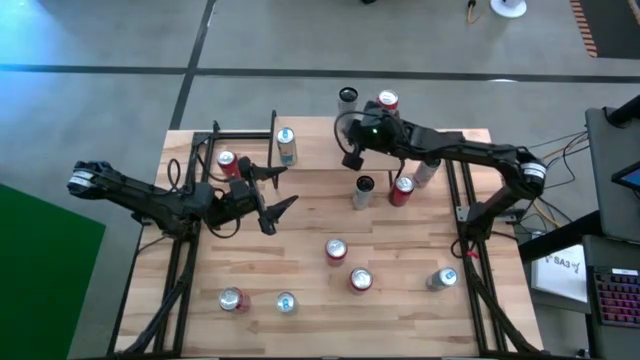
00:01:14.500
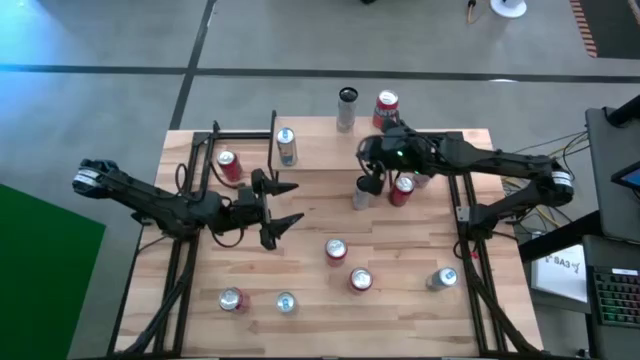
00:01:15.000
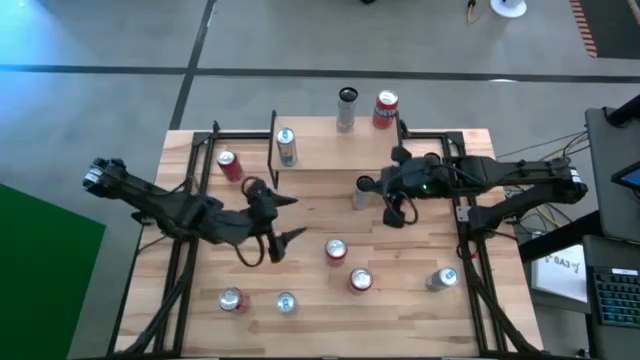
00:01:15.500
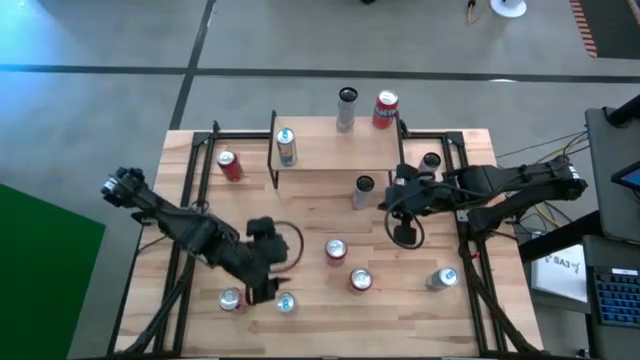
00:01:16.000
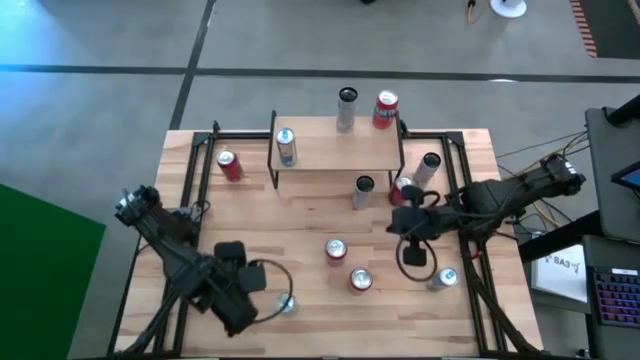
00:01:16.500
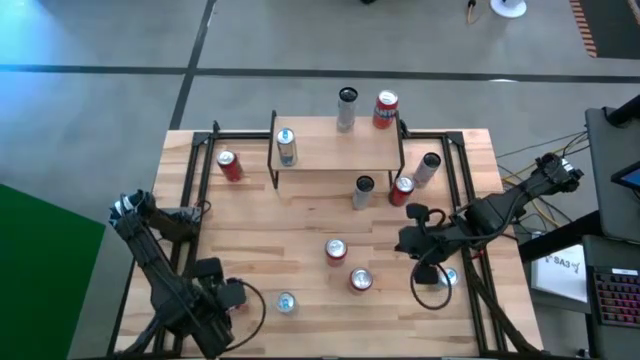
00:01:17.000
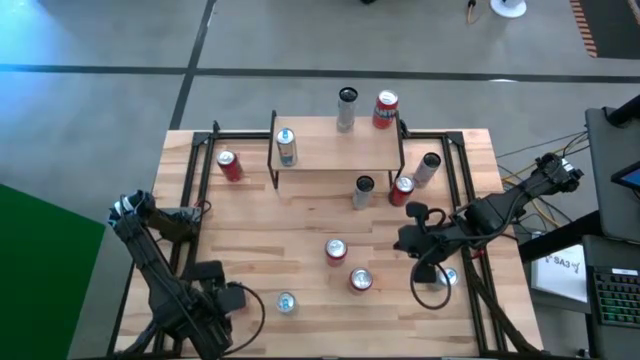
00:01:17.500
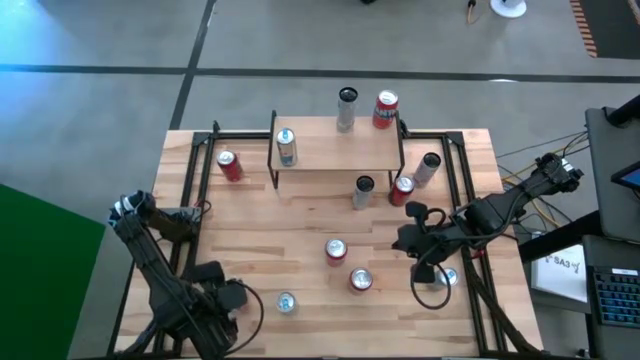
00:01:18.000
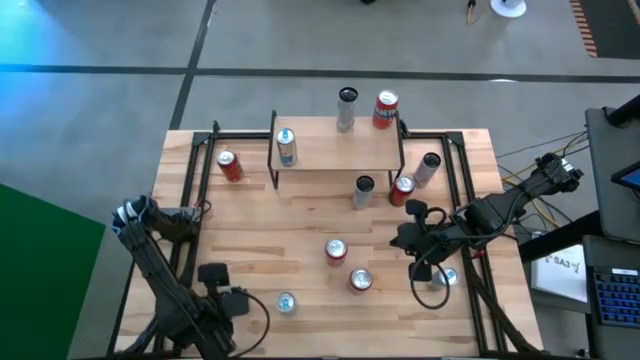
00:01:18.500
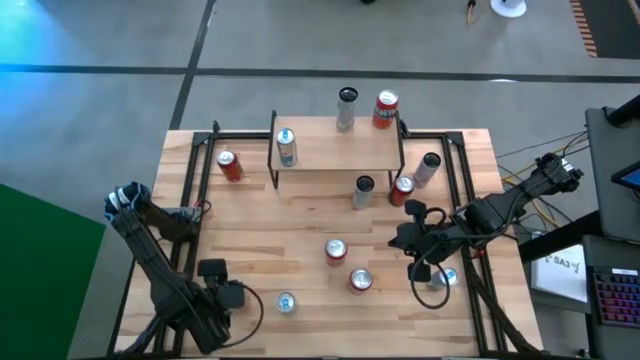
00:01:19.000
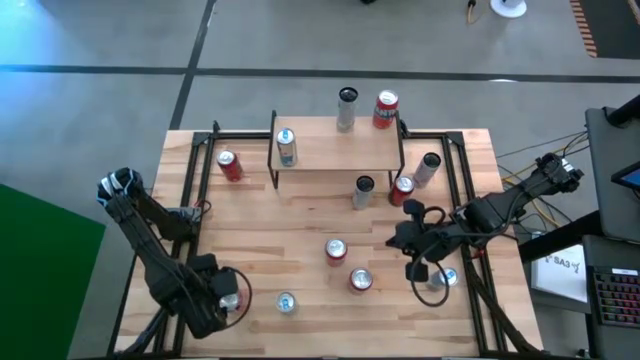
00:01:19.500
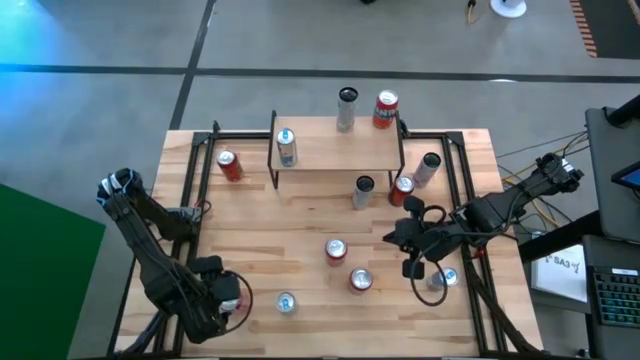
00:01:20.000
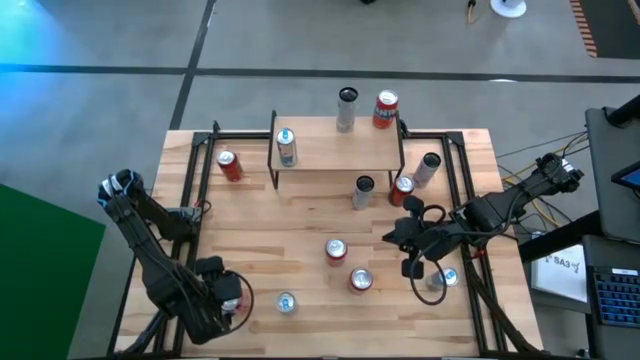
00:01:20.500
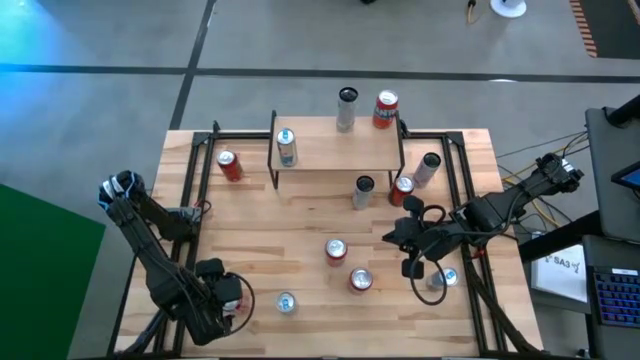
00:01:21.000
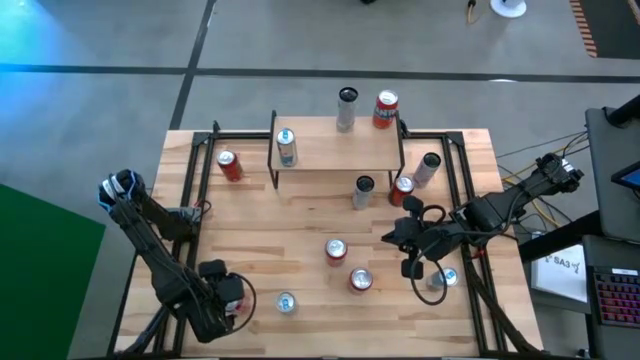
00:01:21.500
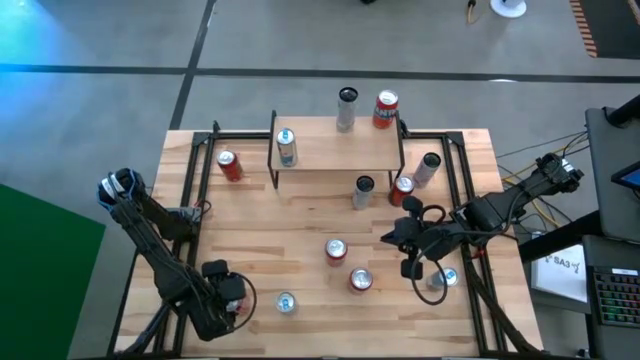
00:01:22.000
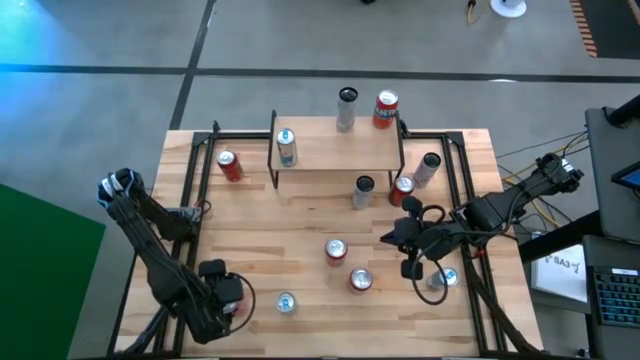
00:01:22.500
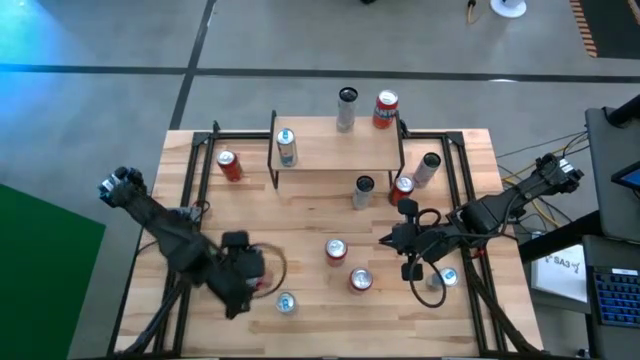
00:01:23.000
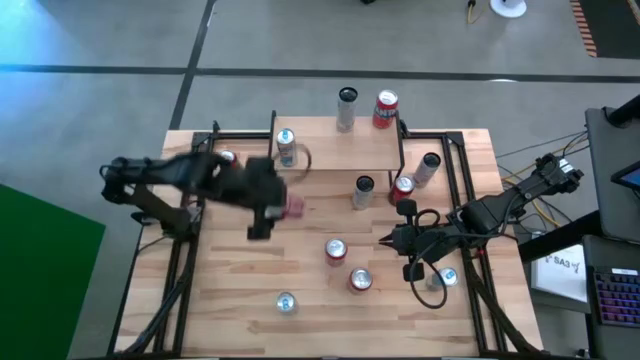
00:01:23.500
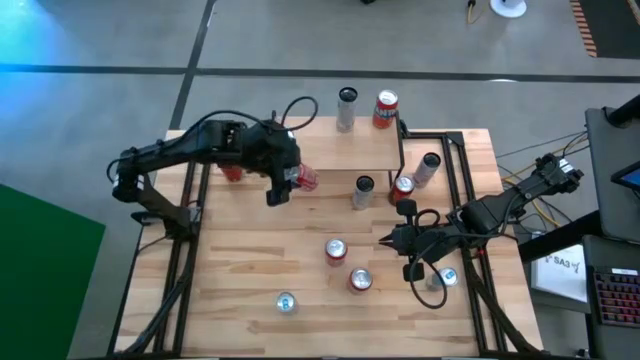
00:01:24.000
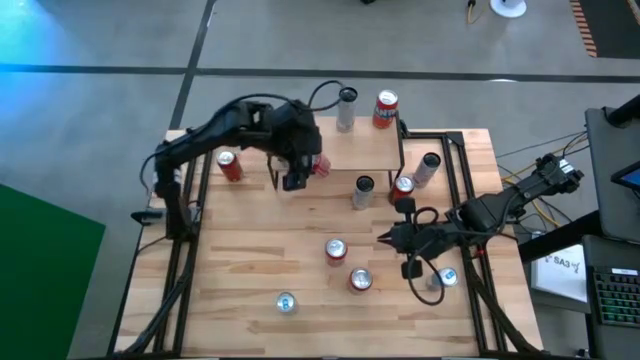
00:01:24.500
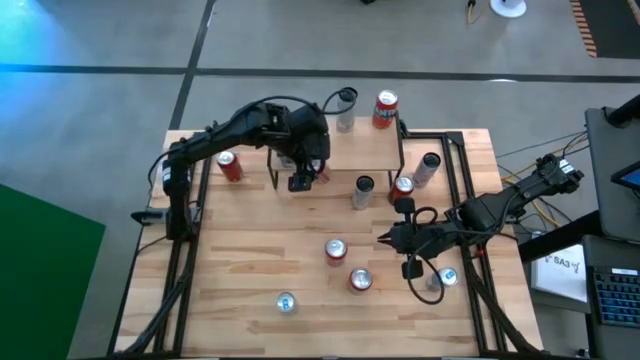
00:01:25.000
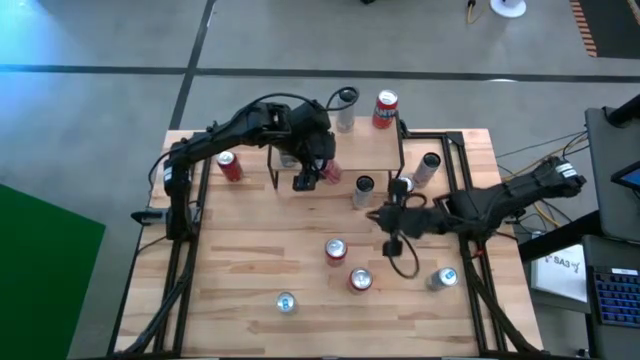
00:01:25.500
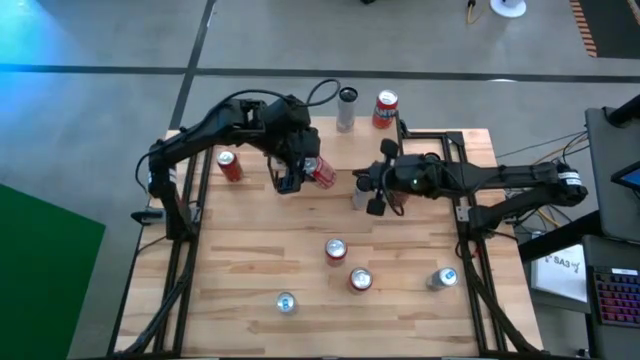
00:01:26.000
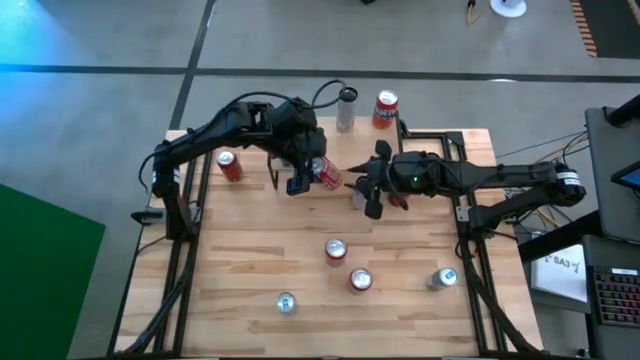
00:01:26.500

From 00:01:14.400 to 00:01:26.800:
Task: Place canned beverage on shelf
Put the bottom left red black soda can on the shelf

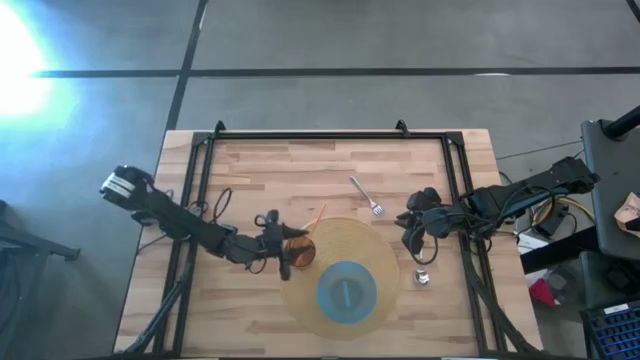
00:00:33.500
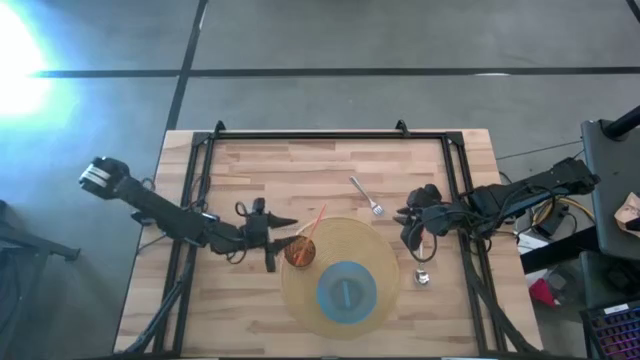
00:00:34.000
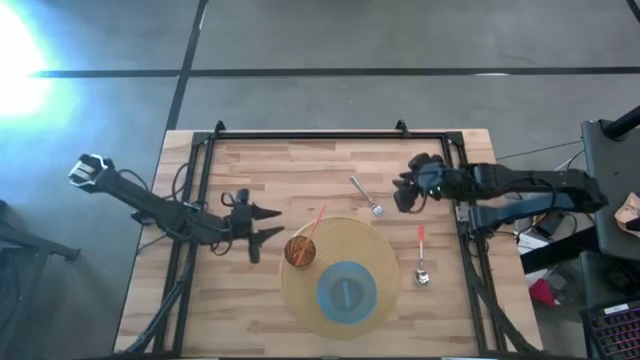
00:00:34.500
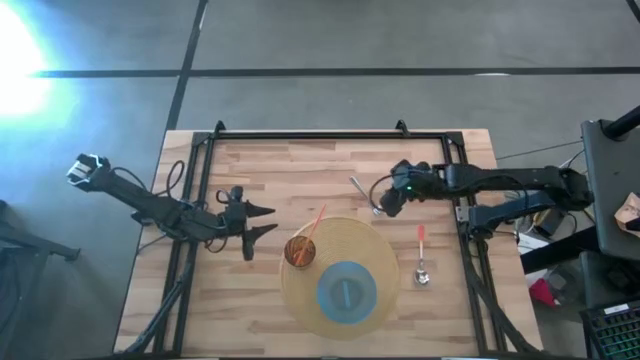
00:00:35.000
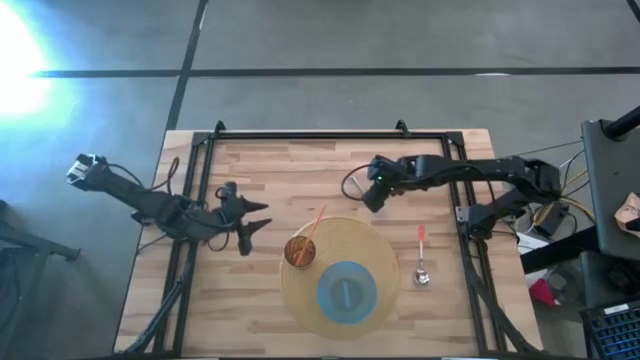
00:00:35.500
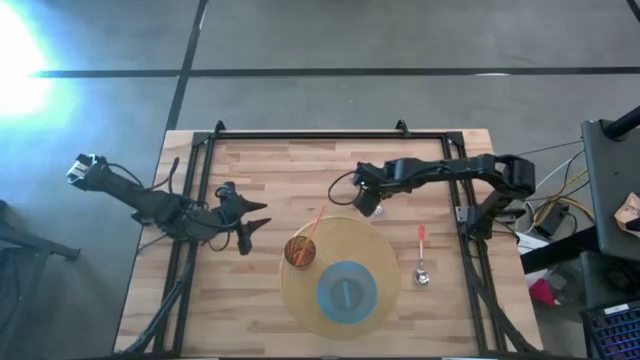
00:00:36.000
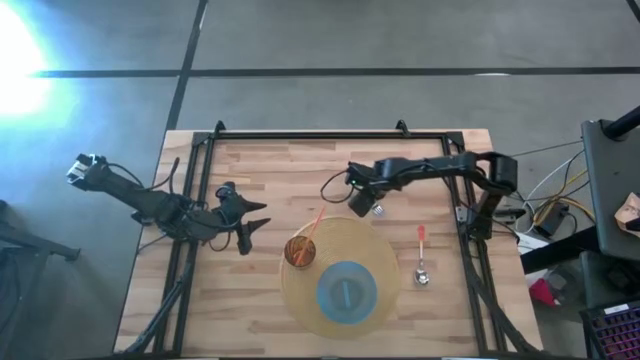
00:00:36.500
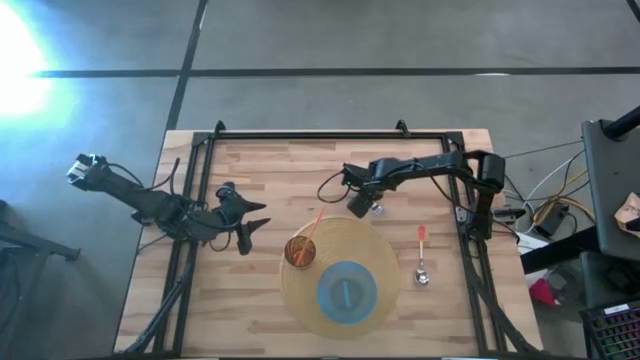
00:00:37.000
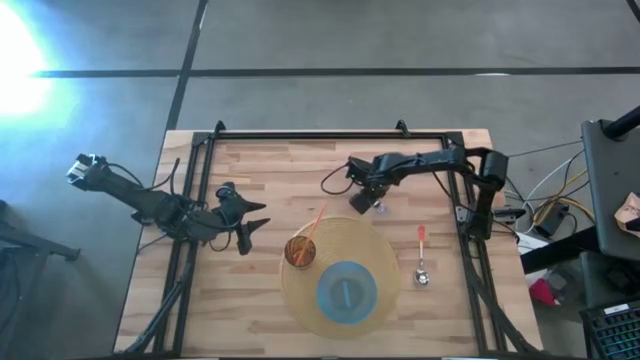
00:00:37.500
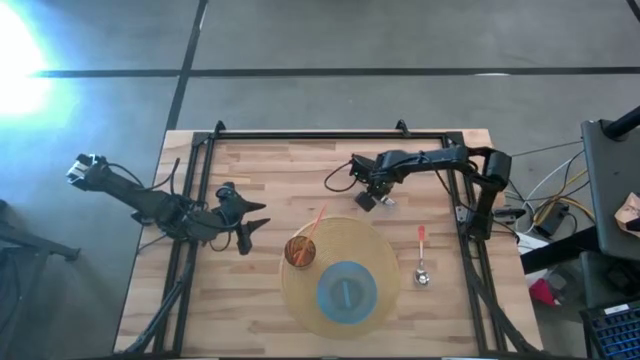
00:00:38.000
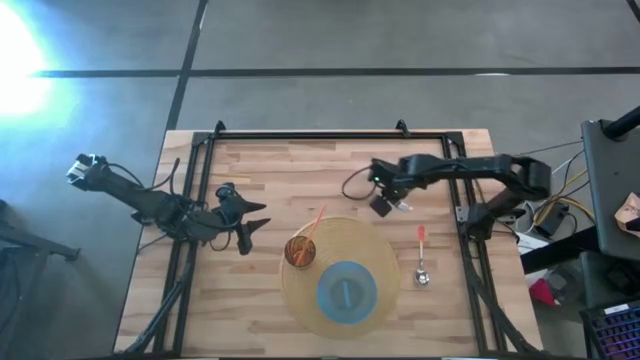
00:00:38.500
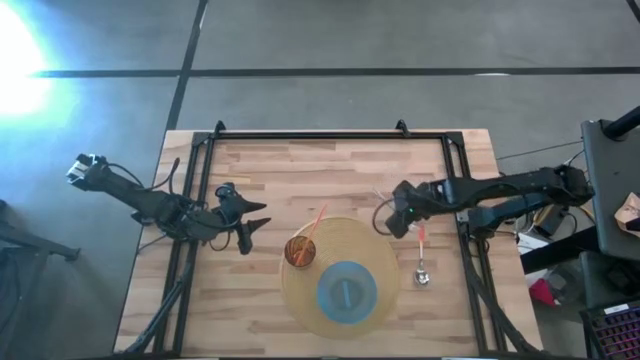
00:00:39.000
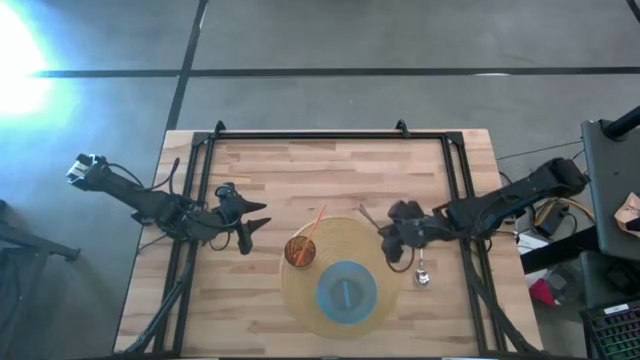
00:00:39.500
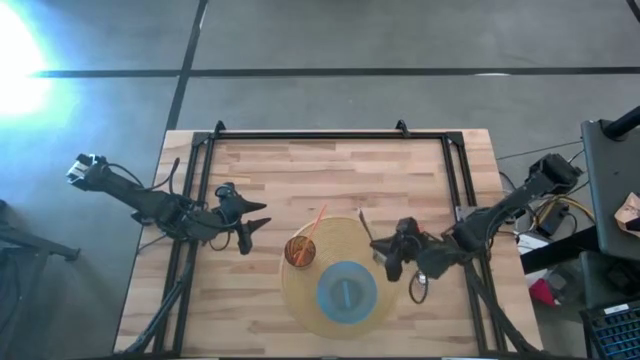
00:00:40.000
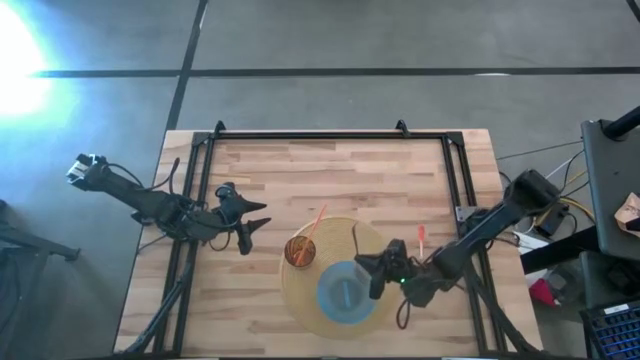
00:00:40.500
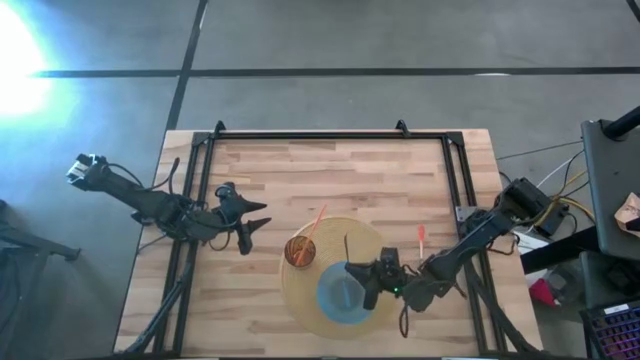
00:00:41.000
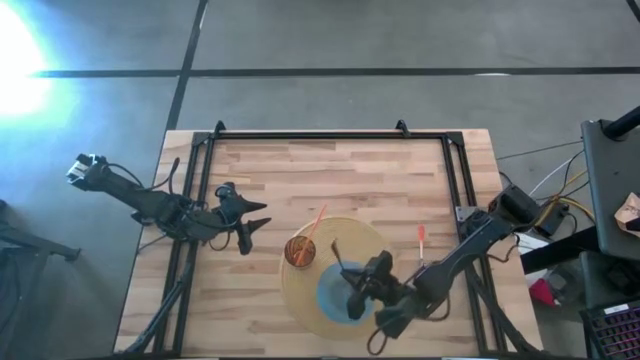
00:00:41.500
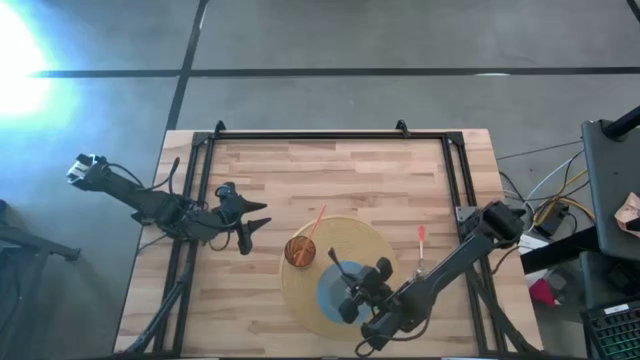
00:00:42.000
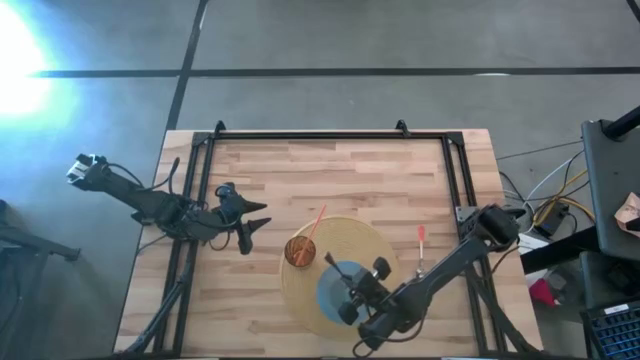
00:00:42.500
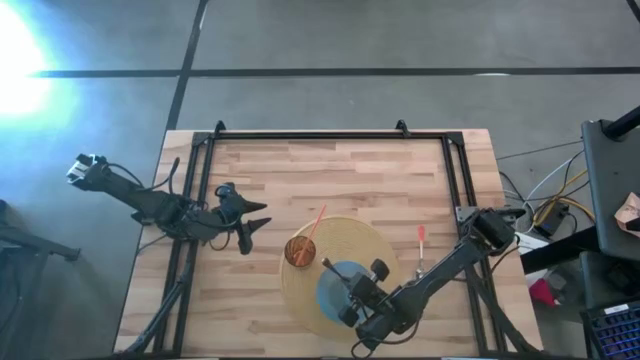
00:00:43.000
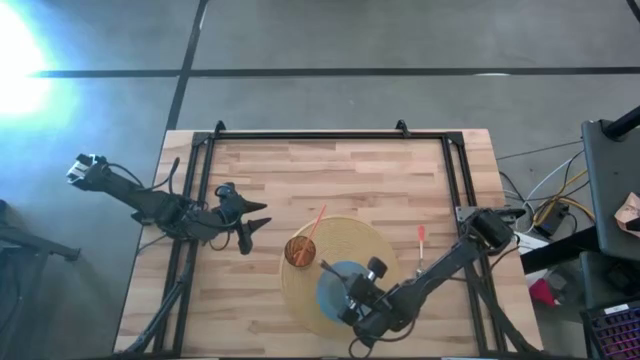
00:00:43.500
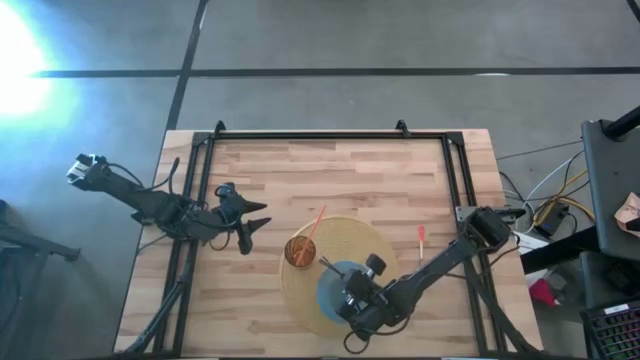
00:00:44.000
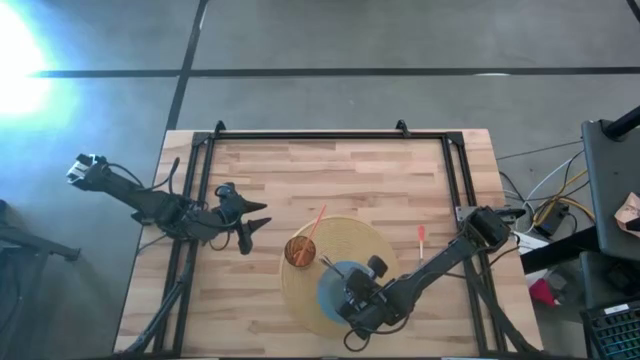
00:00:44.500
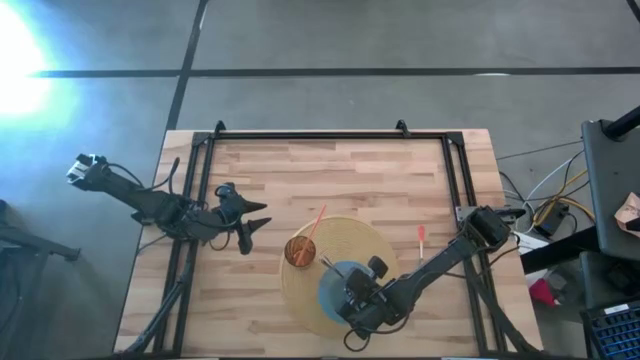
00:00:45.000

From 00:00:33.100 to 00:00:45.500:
Task: Pick & Place Utensil
Put the silver fork into the blue bowl
